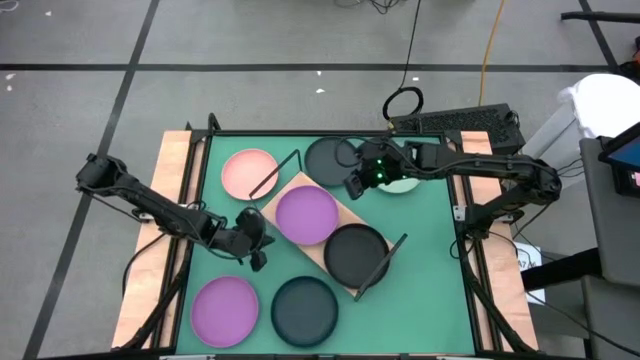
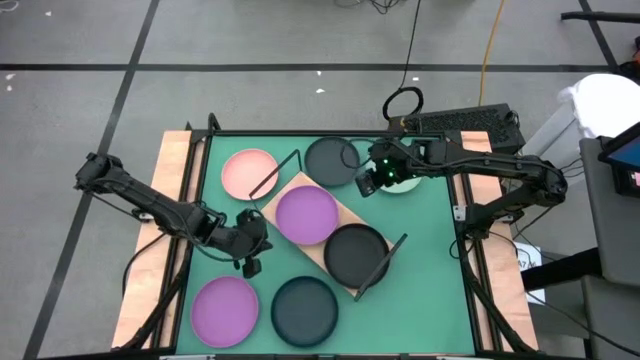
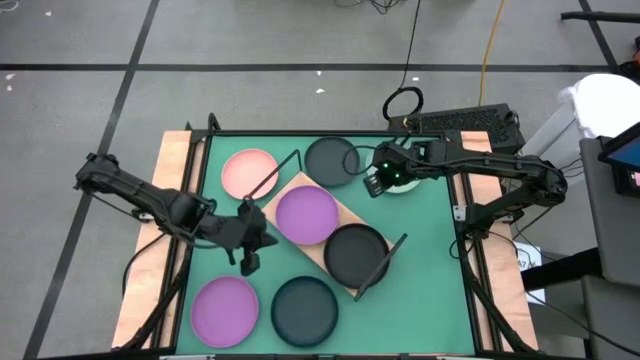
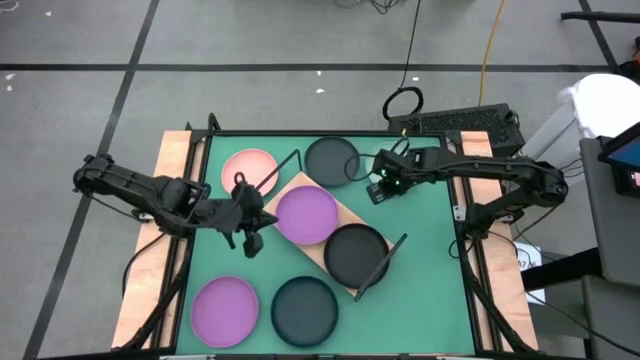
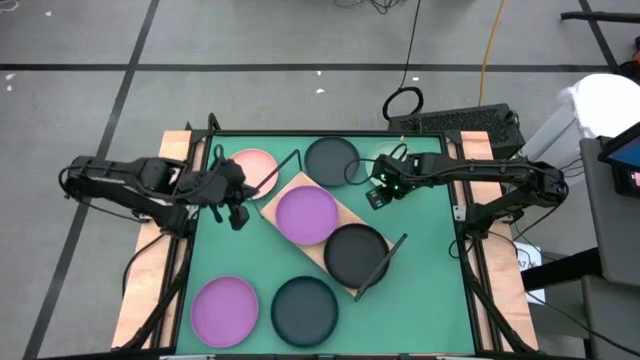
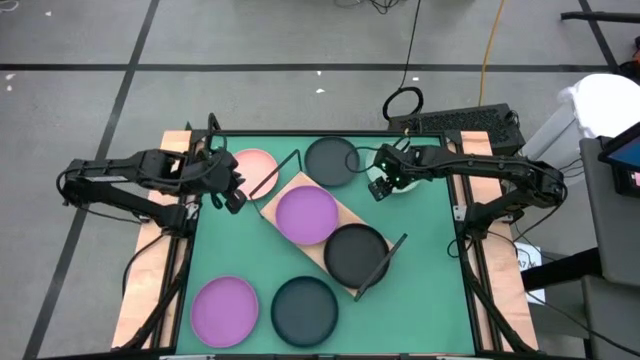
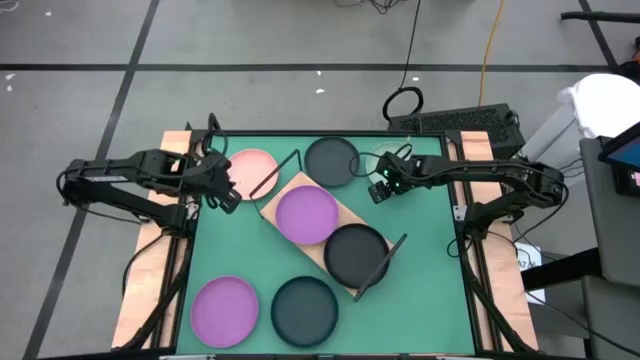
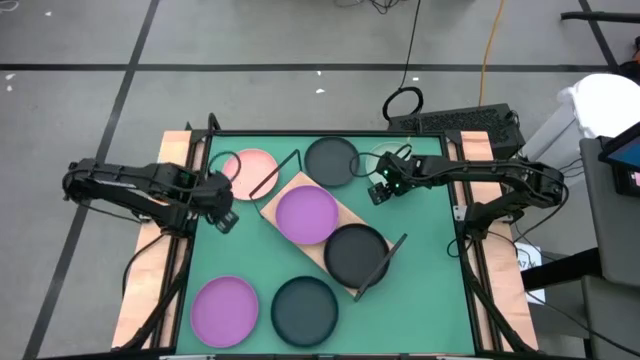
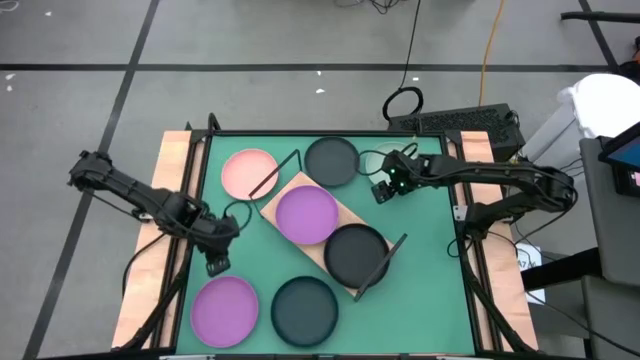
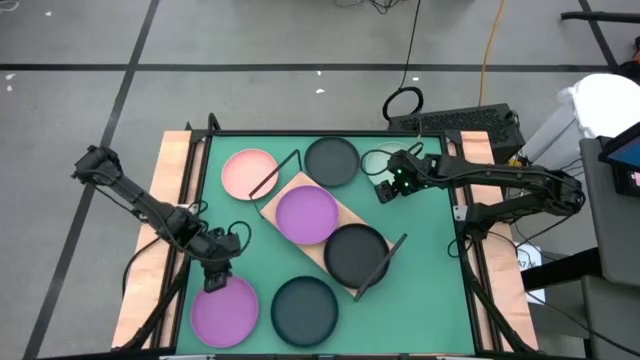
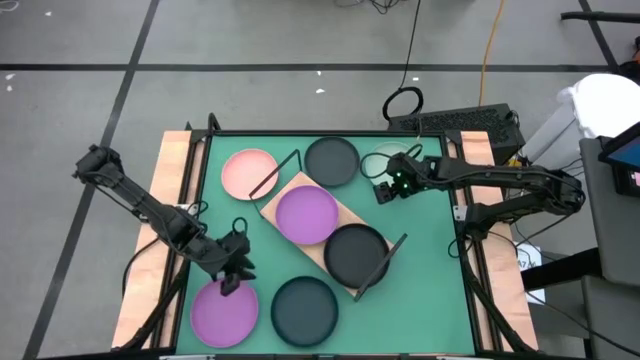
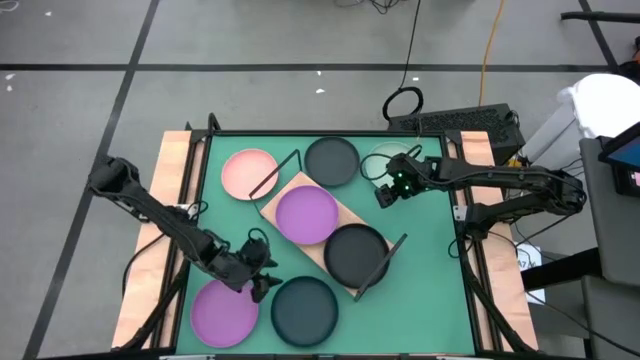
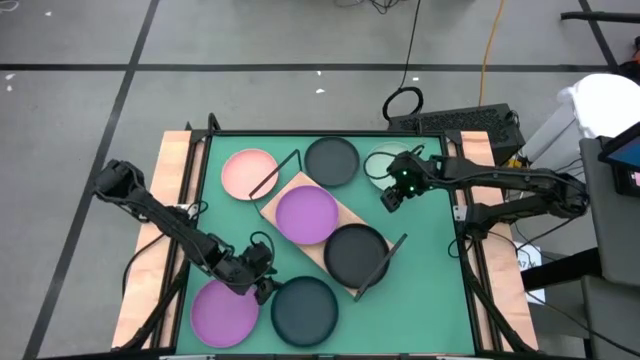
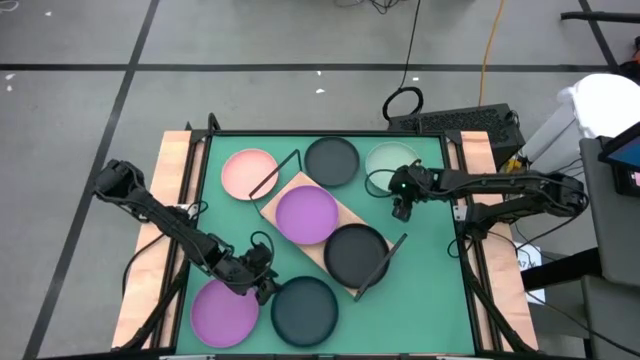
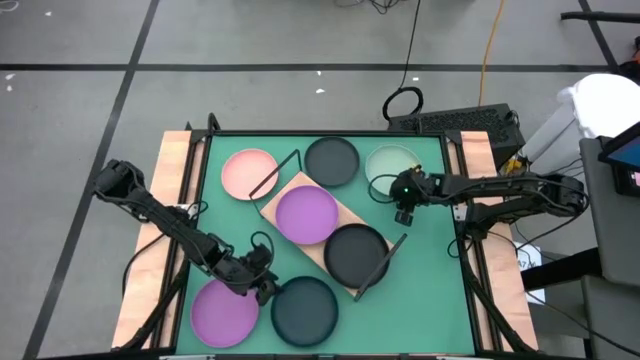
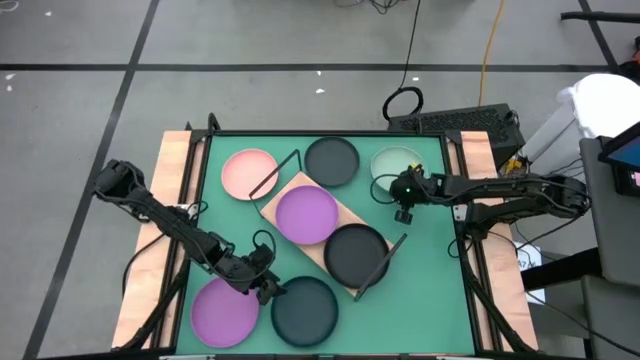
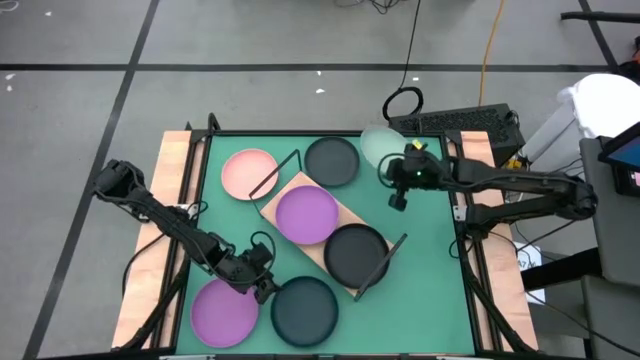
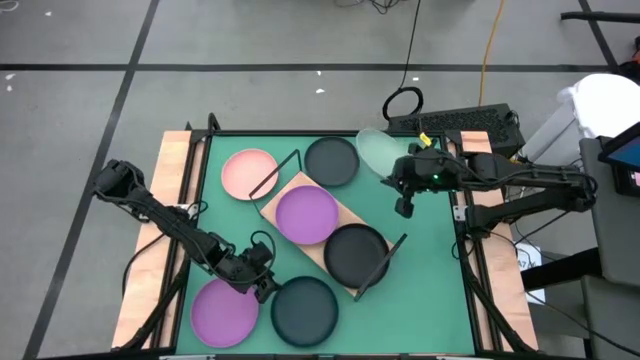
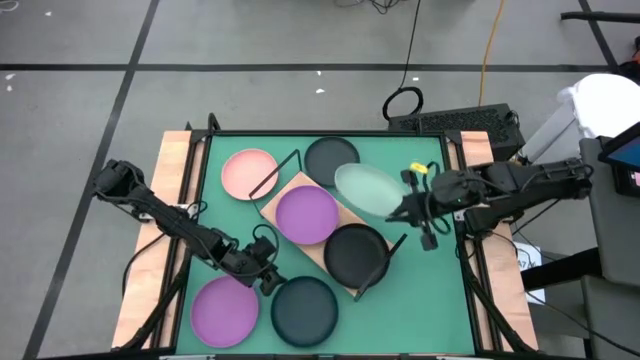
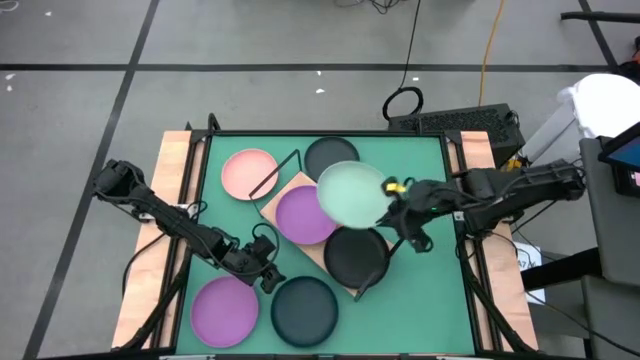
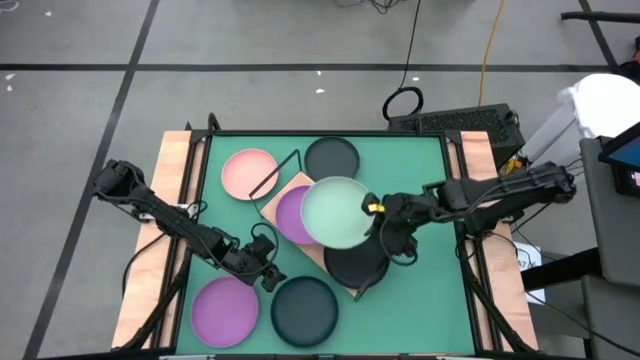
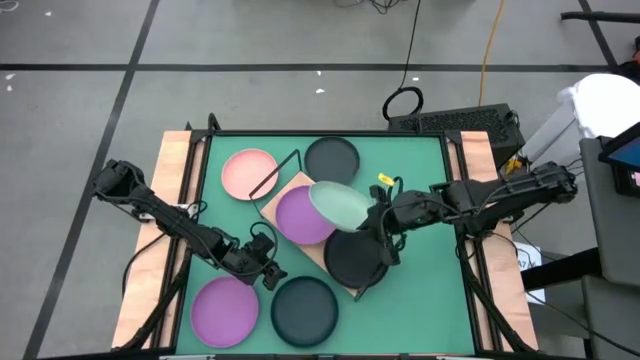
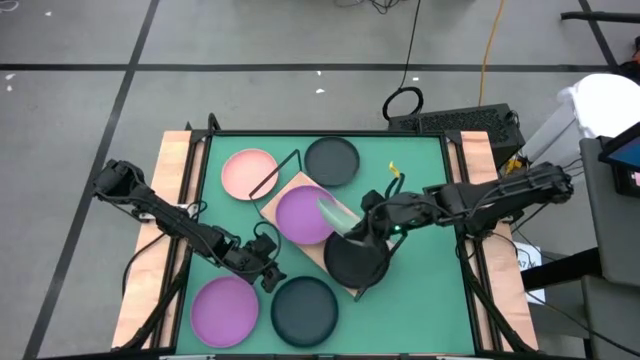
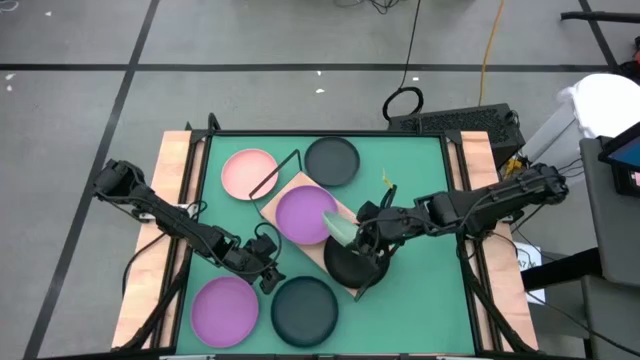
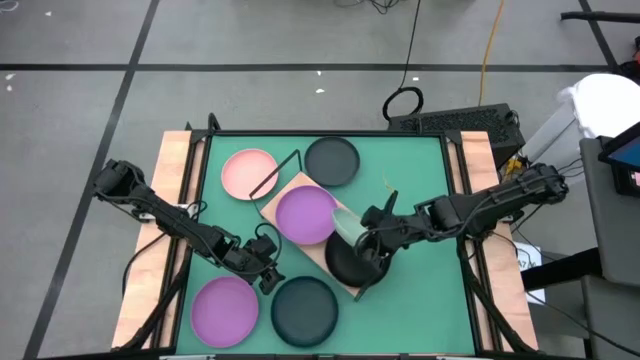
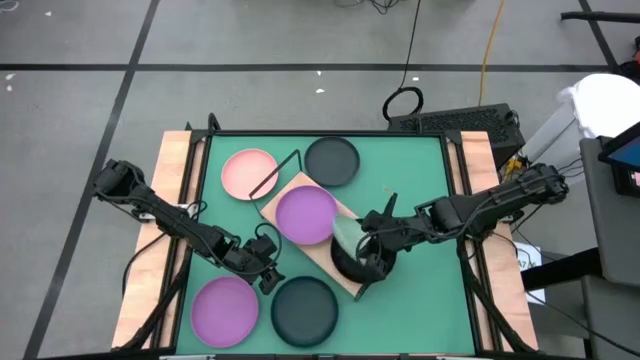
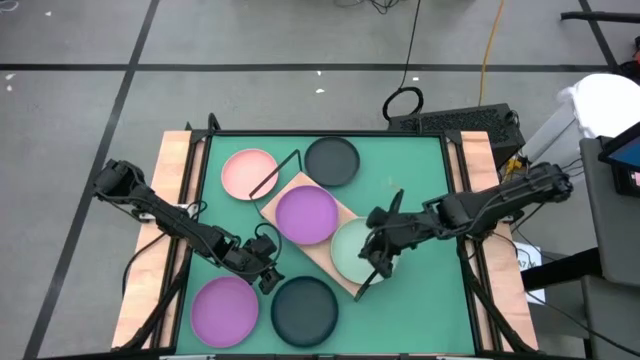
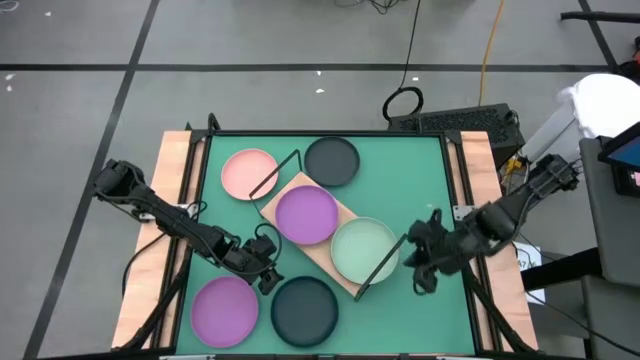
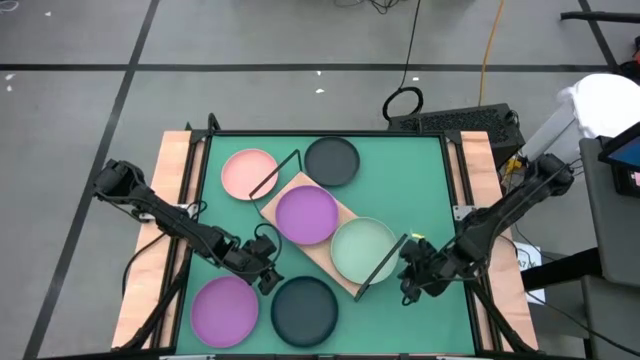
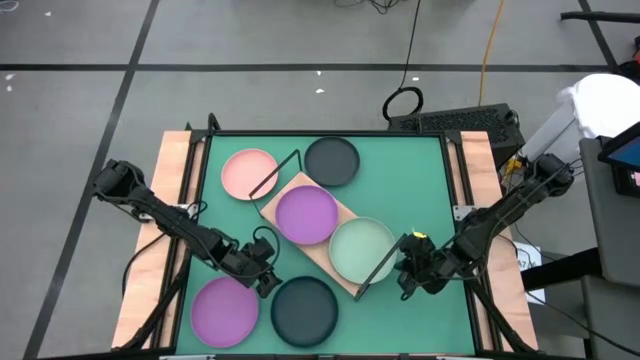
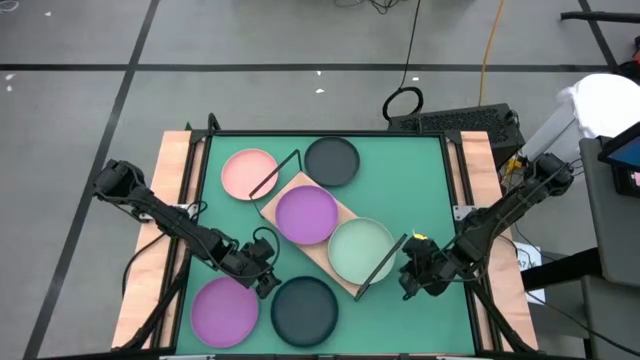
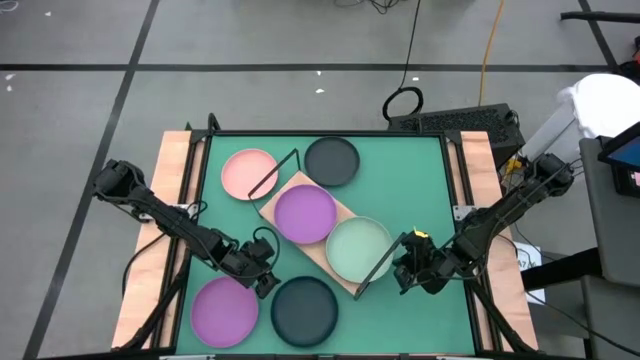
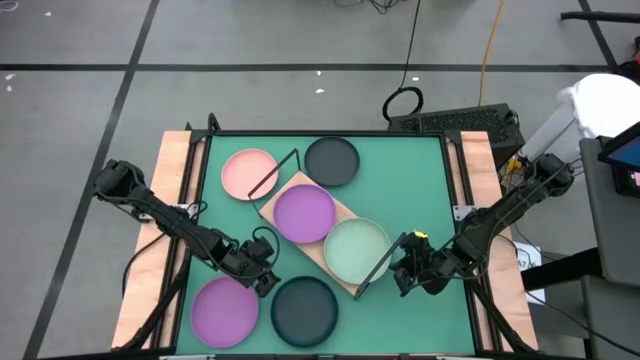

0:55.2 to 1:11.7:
Task: Place and stack plates onto a shelf
Stack the green plate on the black plate on the shelf

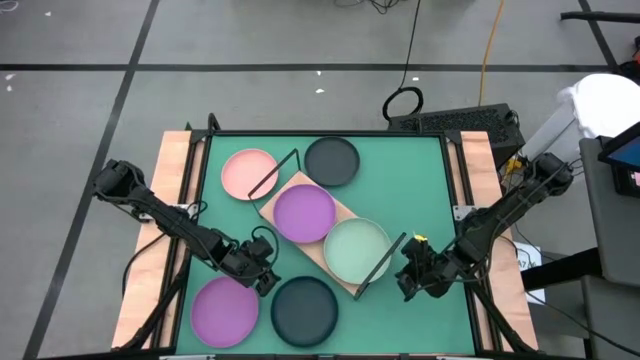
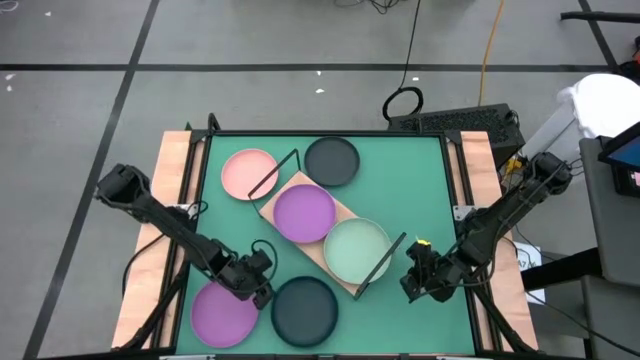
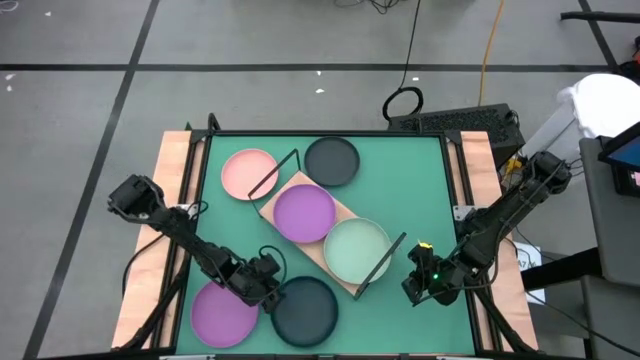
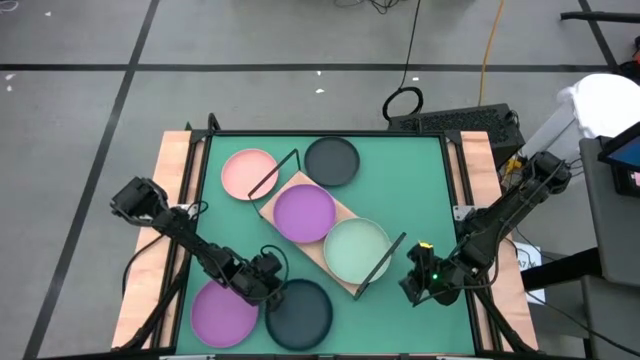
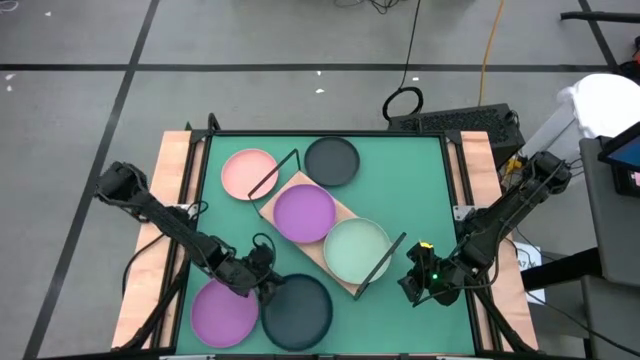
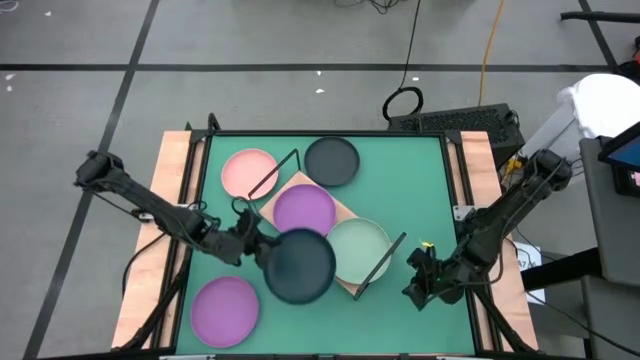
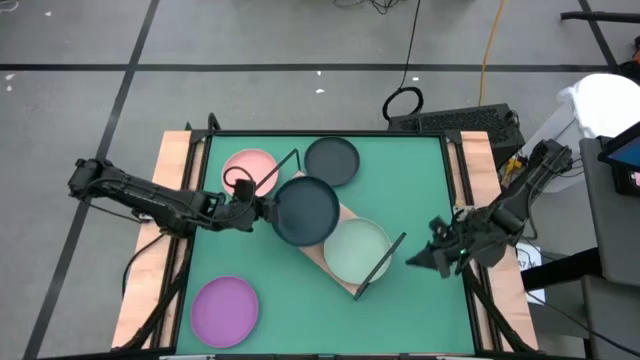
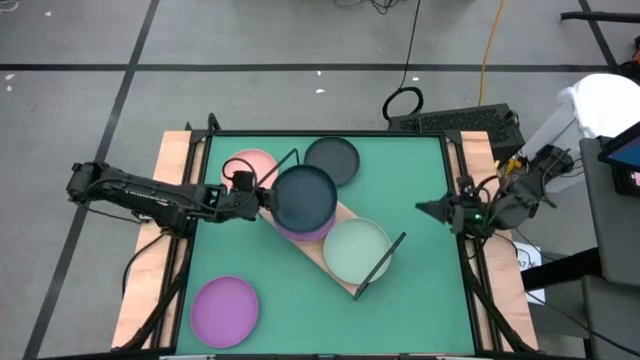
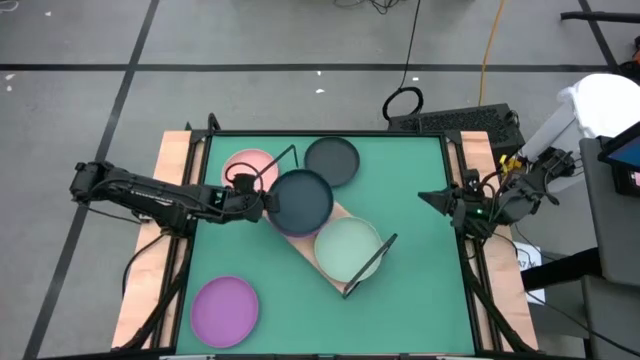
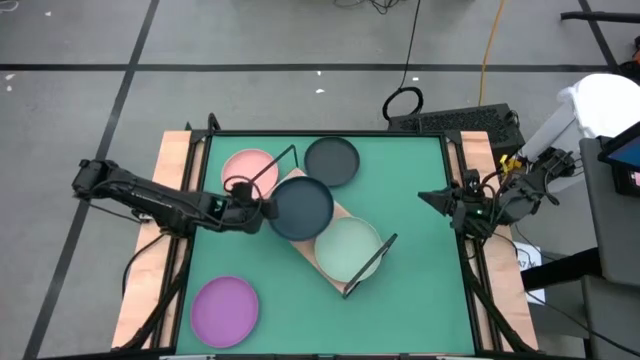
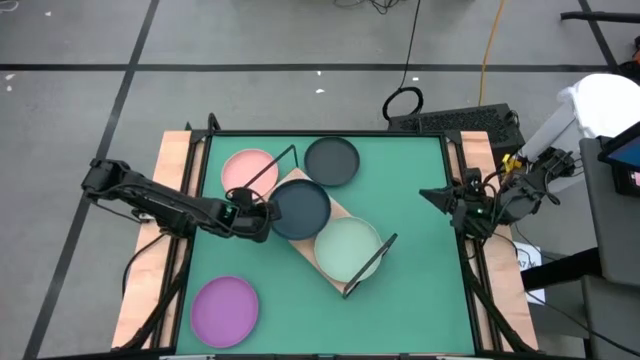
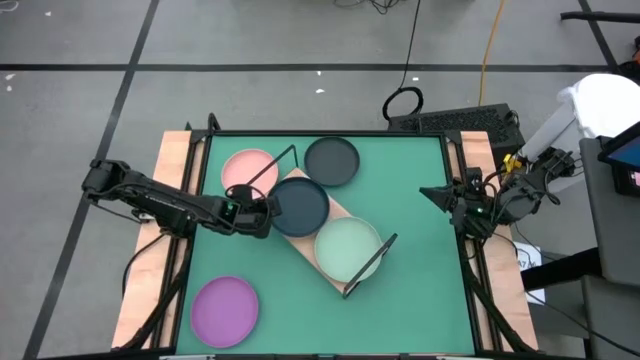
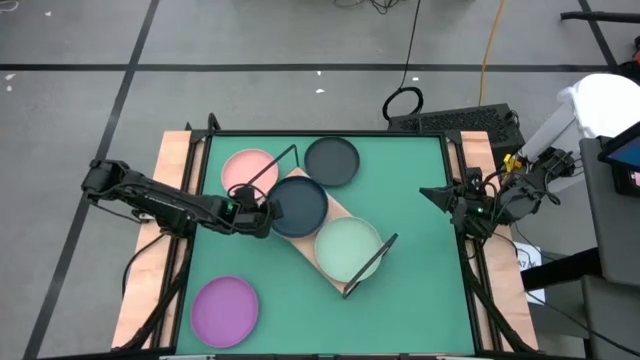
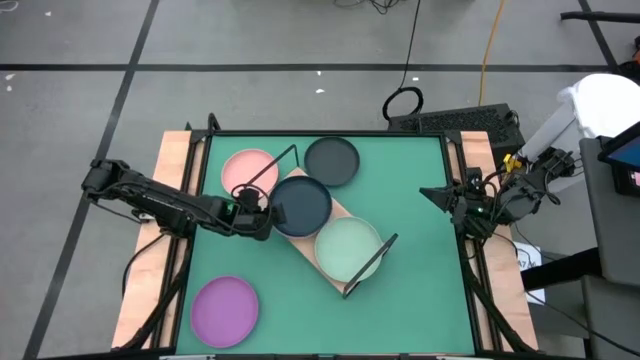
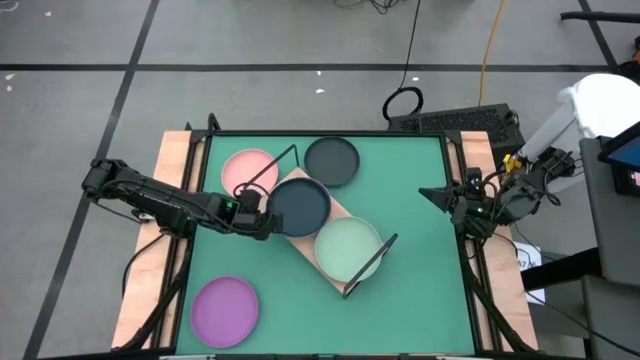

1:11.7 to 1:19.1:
Stack the dark blue plate on the violet plate on the shelf
